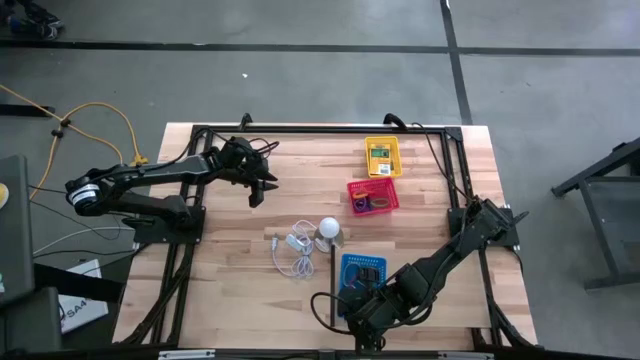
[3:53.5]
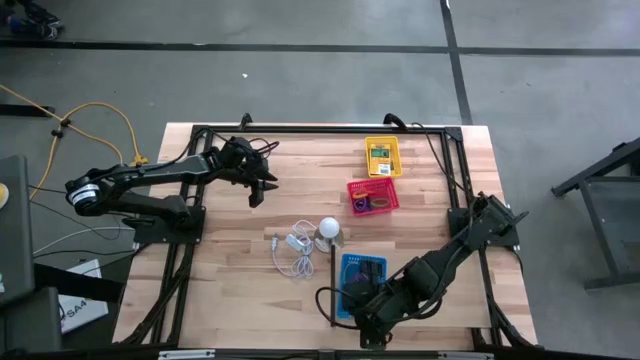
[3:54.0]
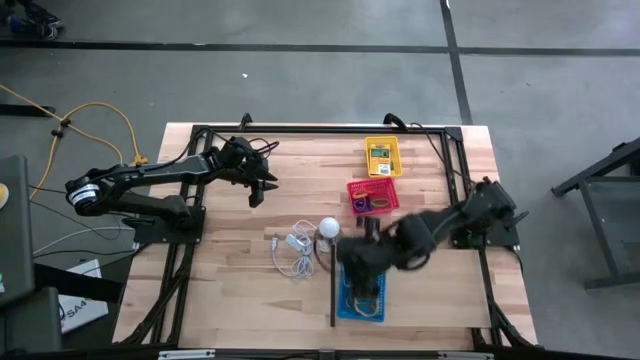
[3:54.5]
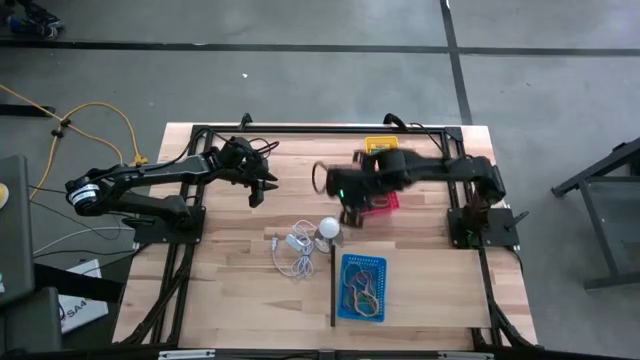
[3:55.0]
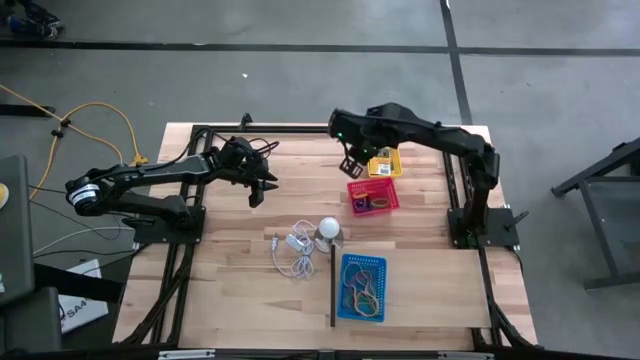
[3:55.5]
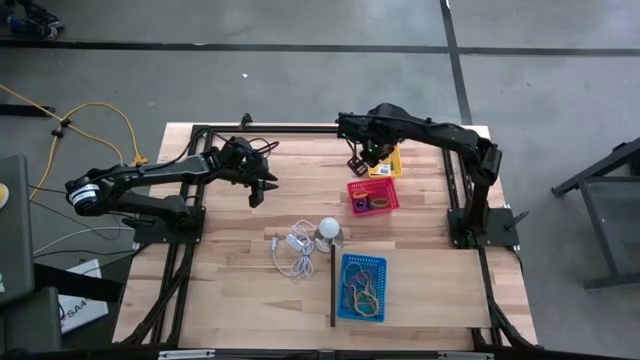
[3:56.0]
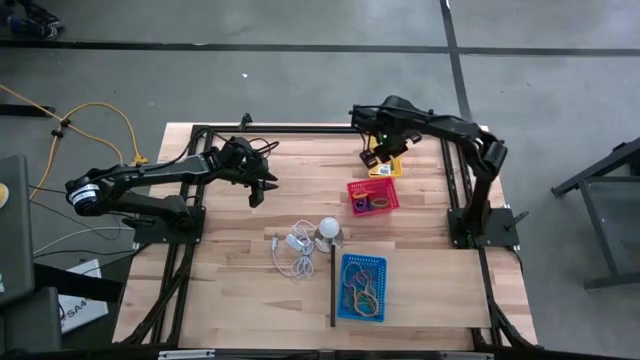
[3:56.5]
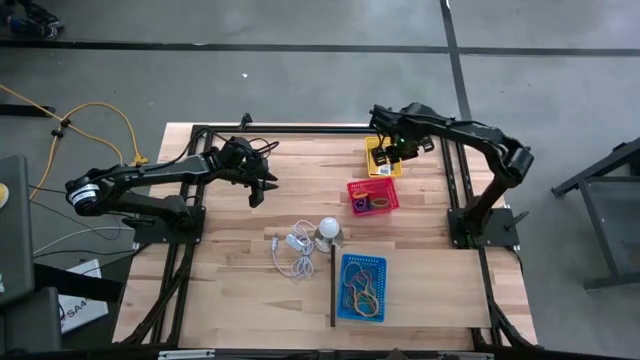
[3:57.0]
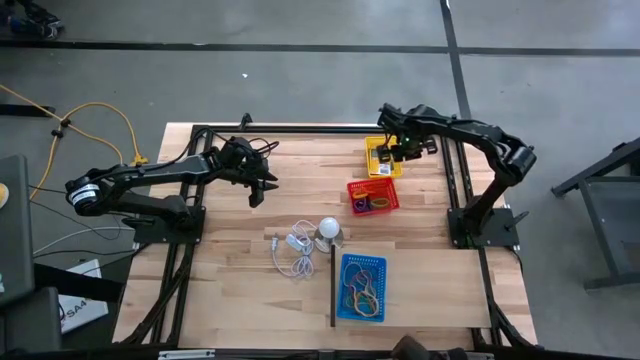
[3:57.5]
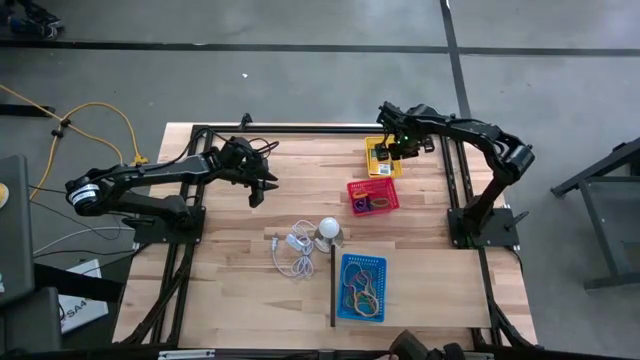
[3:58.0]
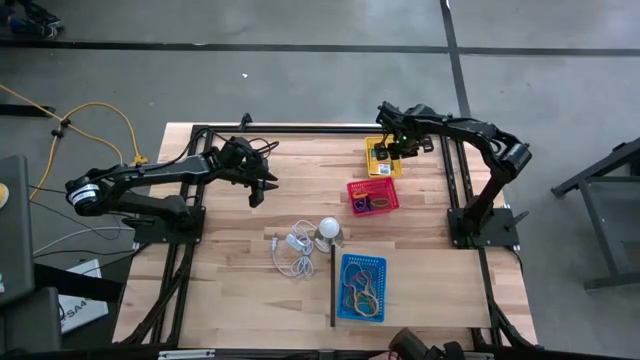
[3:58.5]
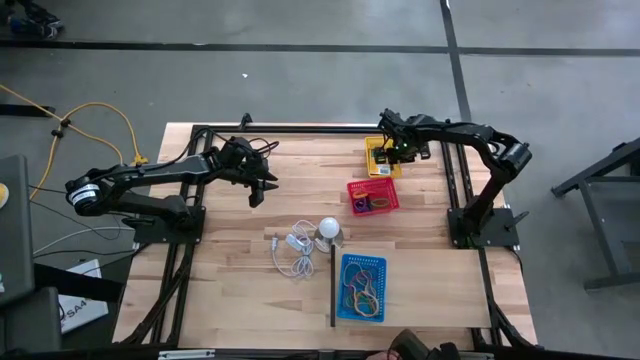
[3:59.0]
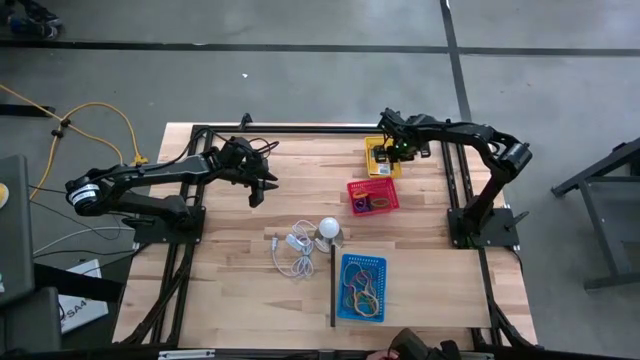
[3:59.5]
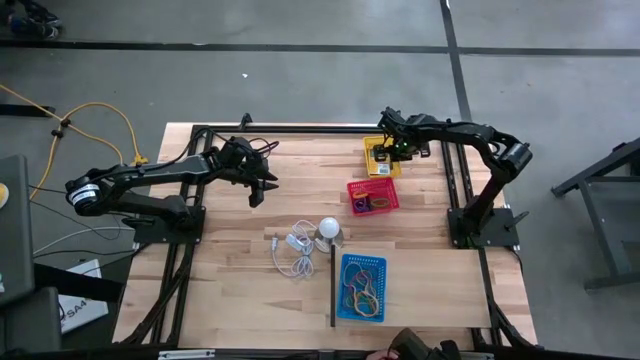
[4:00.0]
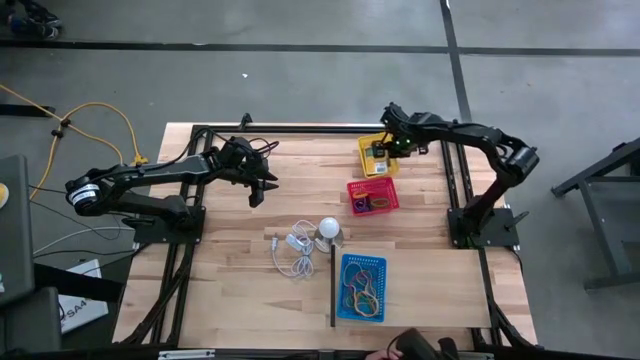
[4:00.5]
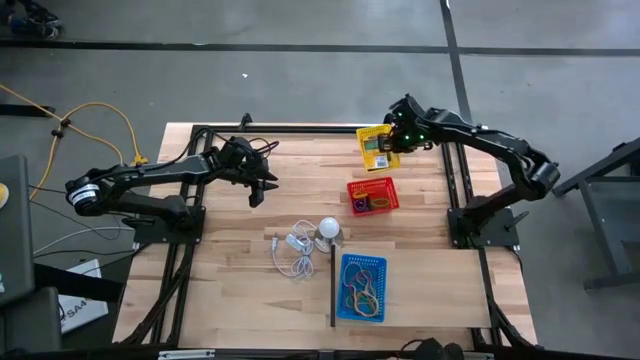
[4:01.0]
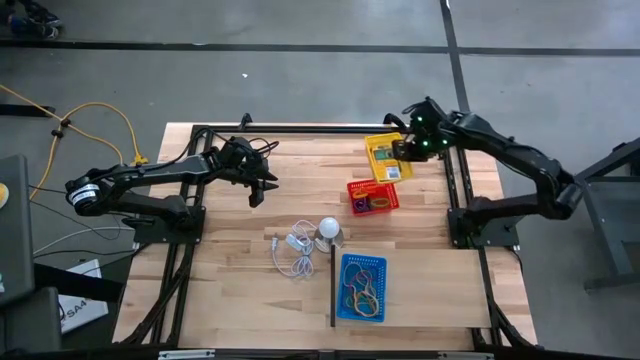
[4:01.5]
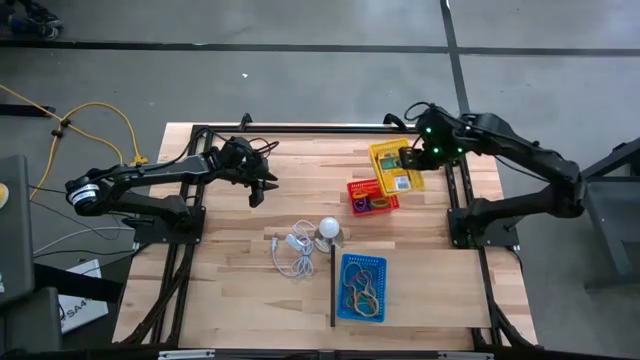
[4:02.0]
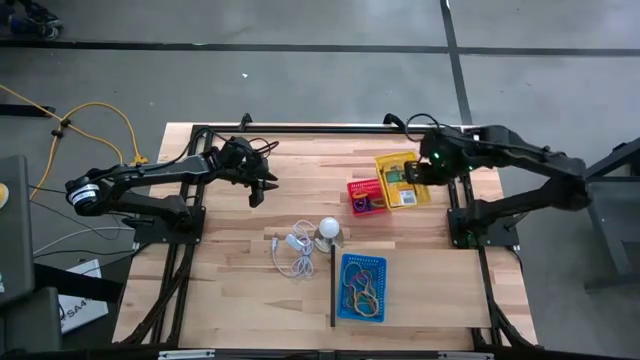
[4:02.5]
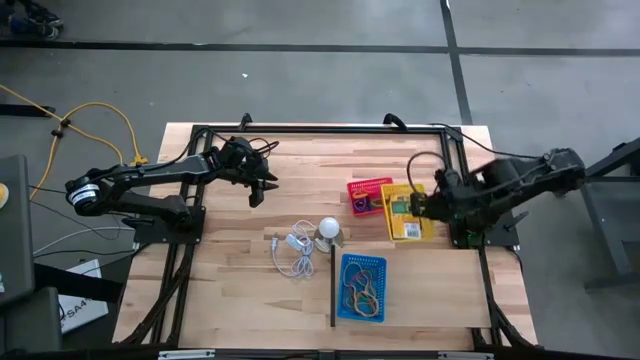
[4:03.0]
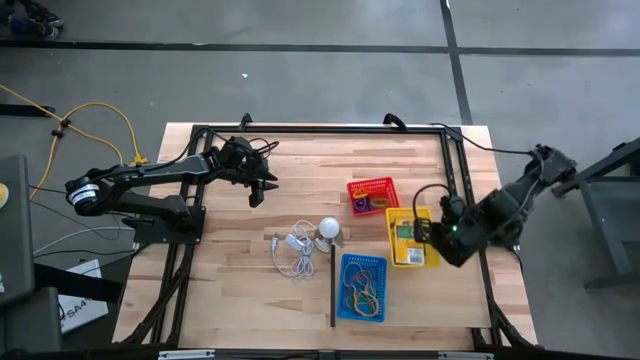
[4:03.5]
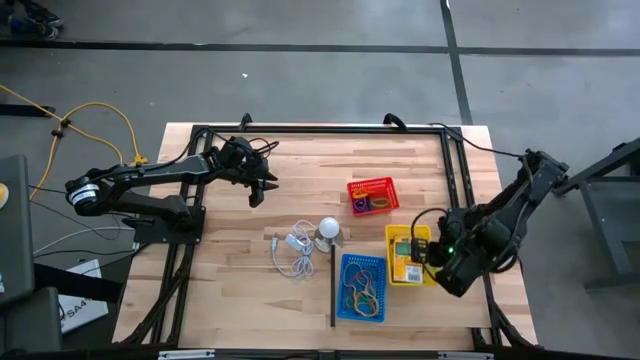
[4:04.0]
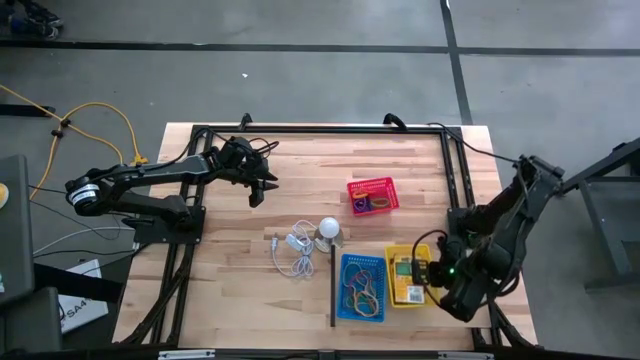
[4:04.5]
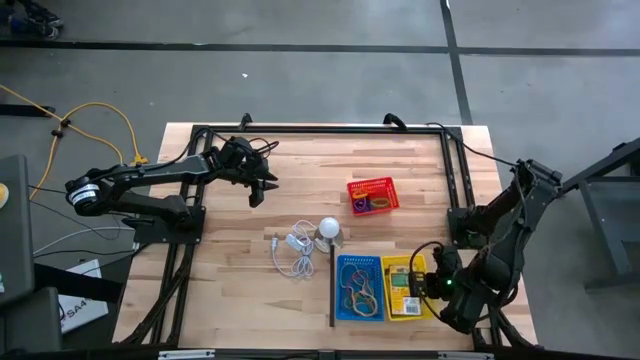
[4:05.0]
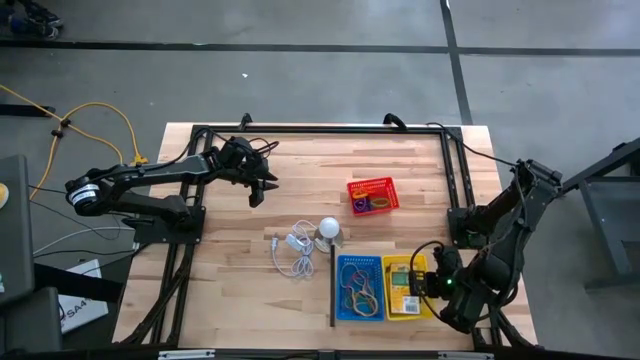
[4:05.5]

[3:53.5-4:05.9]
Task: Pick & Place Office Desk Supplies
Put the yellow bin with the yellow crayon boxes on the shelf

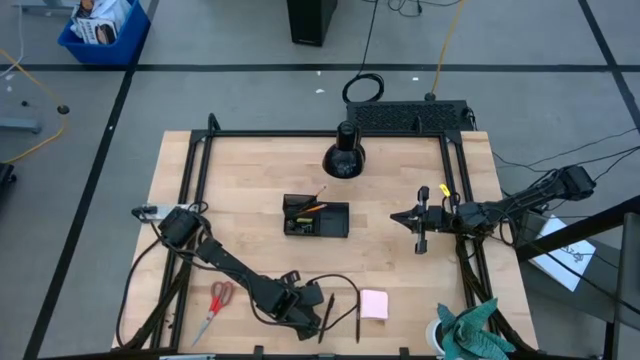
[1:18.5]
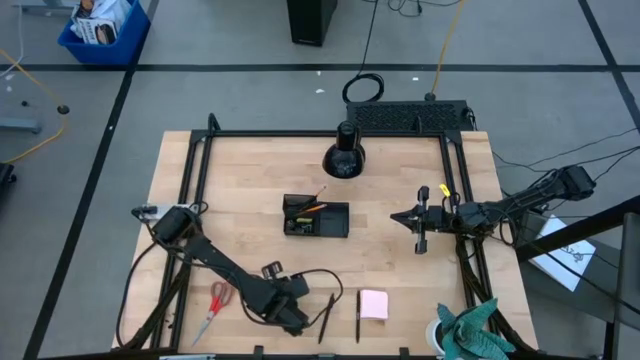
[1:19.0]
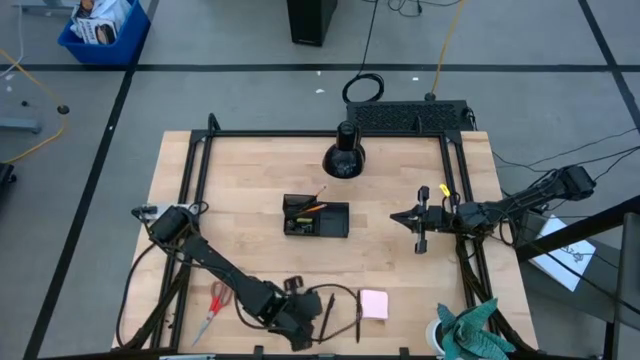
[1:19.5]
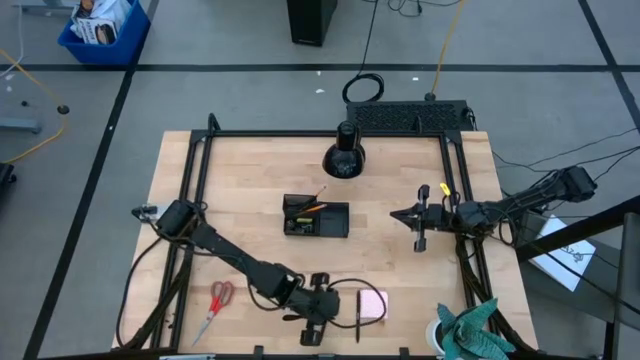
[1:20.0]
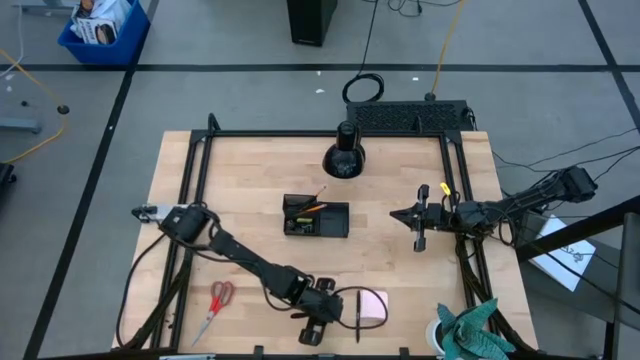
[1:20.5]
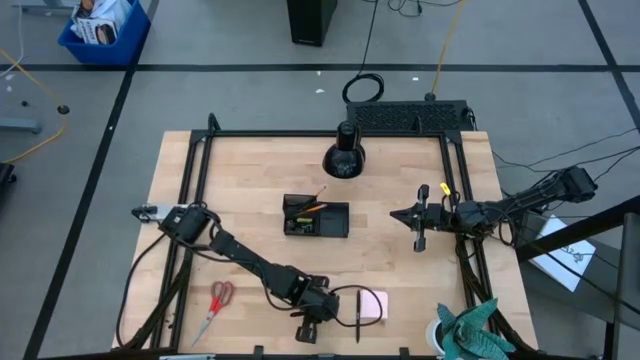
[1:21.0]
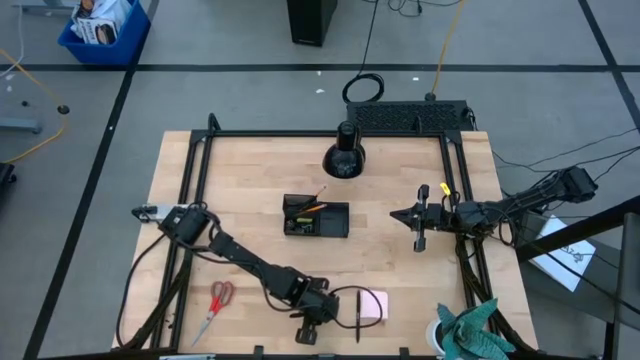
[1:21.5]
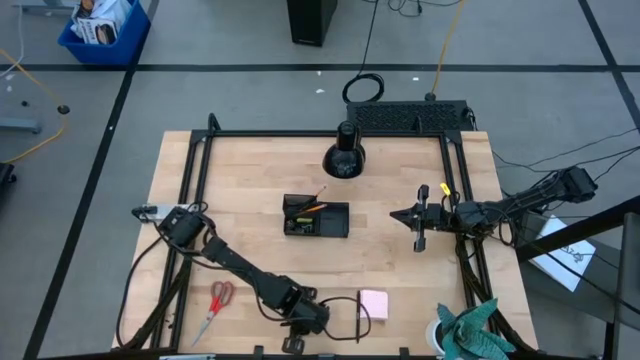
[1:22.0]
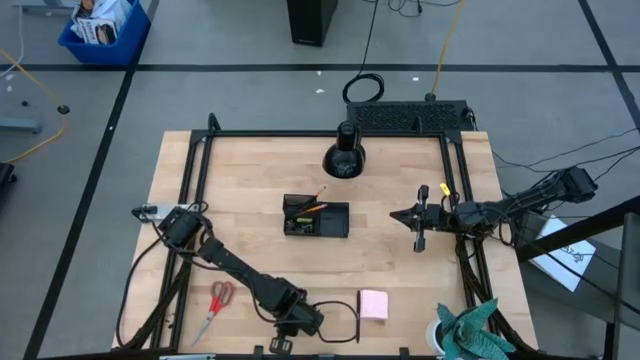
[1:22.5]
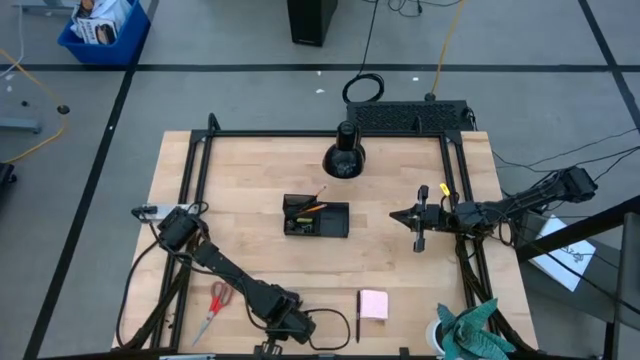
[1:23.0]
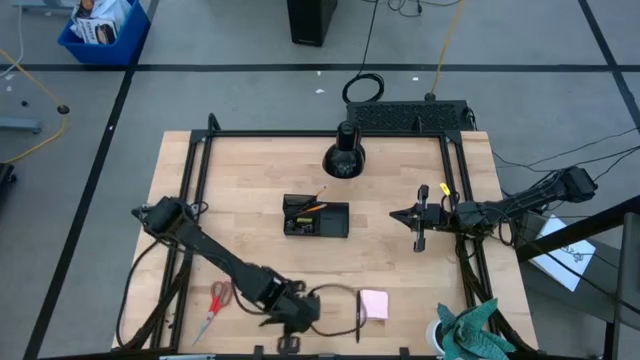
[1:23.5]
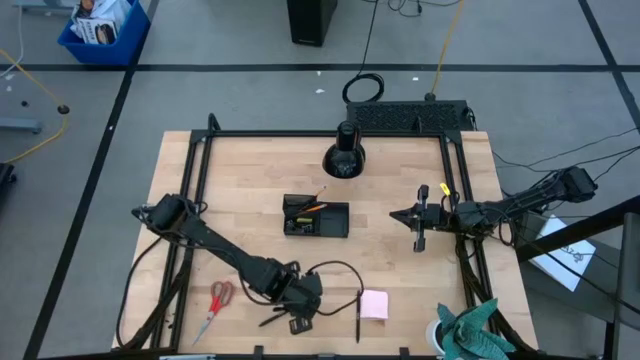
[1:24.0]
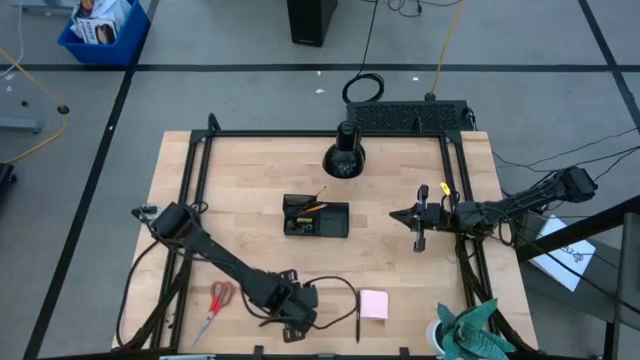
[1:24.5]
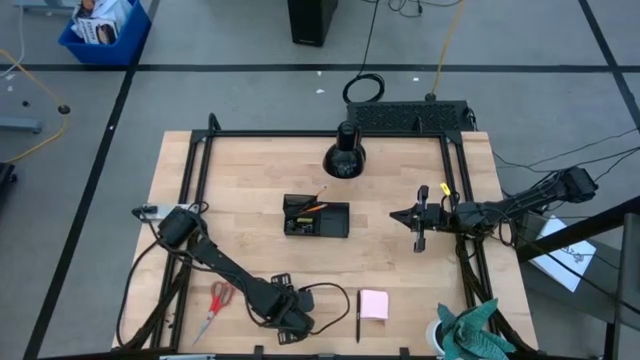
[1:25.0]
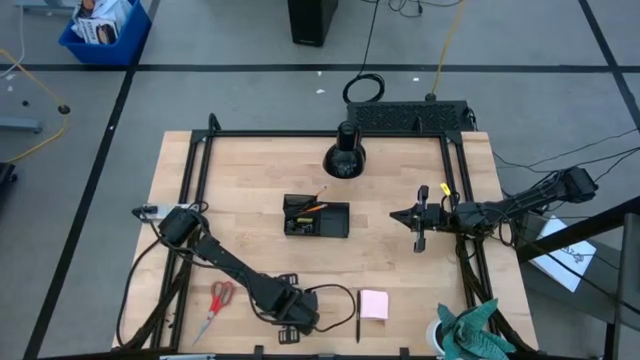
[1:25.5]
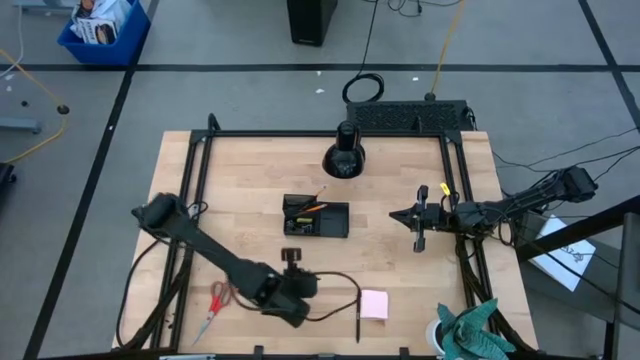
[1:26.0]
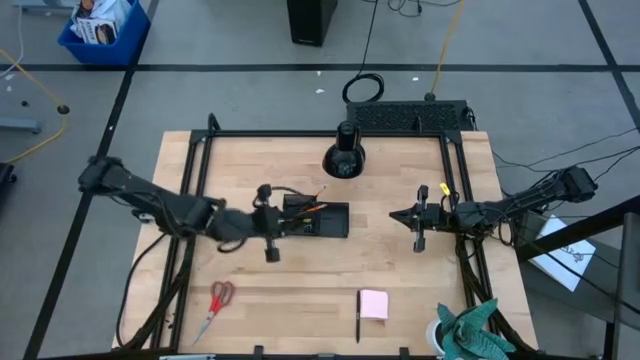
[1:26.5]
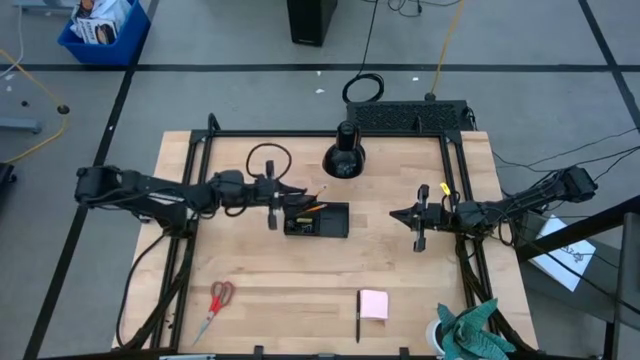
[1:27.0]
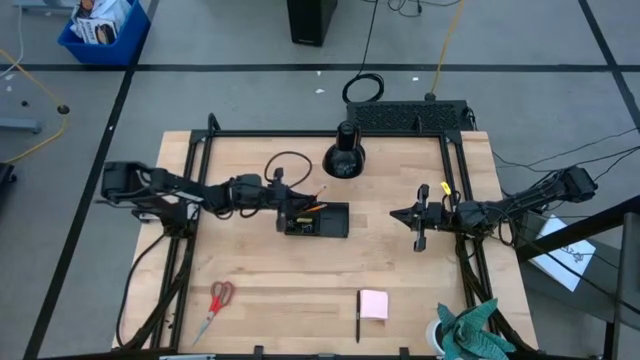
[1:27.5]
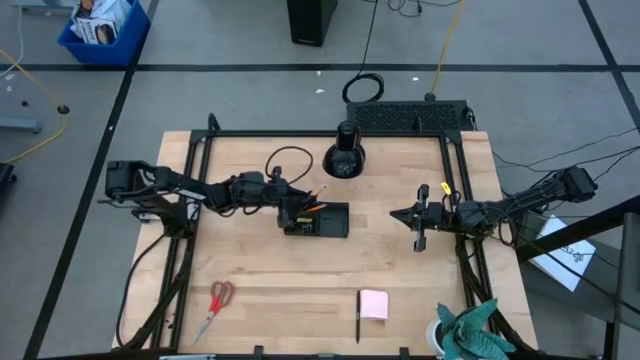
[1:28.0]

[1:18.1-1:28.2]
Task: Pick and place office supplies into organizer
Put the left pen into the desk organizer
